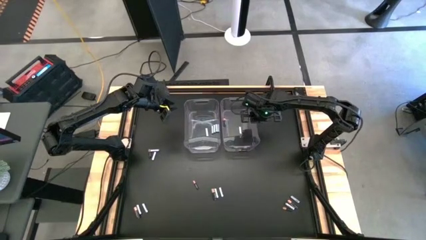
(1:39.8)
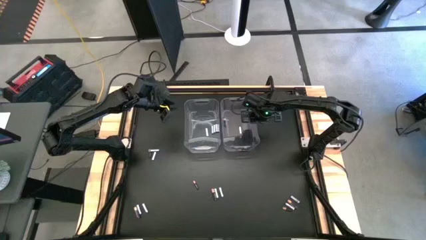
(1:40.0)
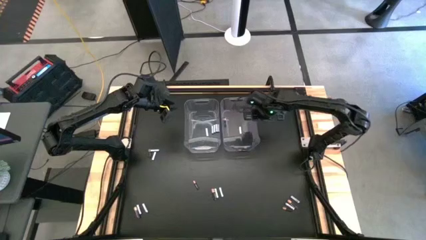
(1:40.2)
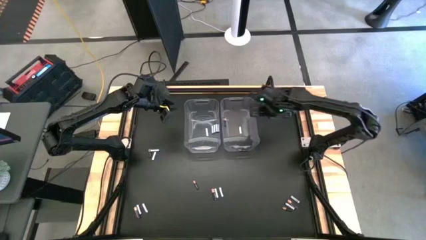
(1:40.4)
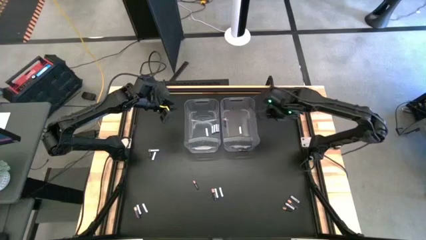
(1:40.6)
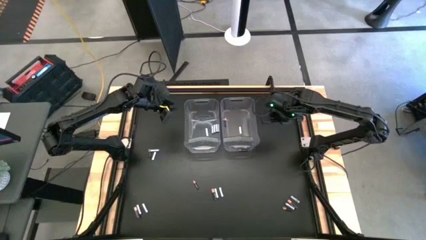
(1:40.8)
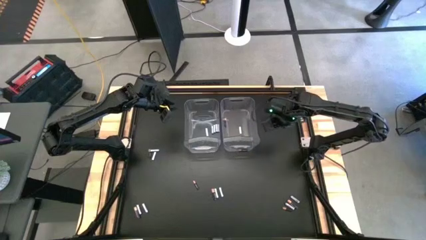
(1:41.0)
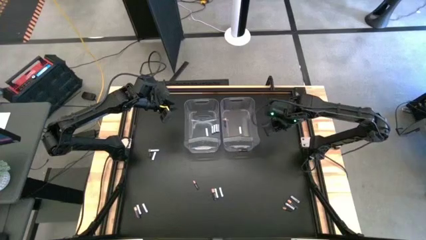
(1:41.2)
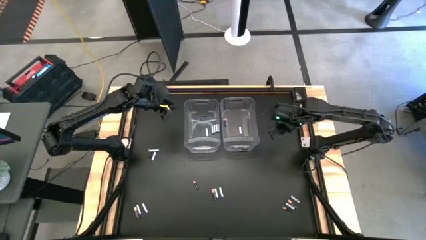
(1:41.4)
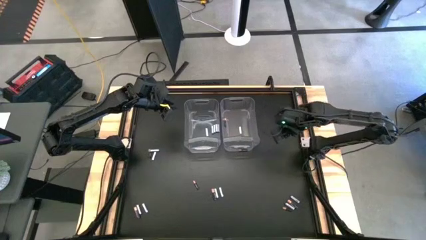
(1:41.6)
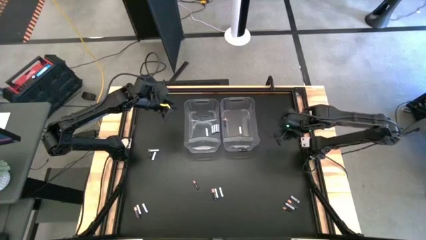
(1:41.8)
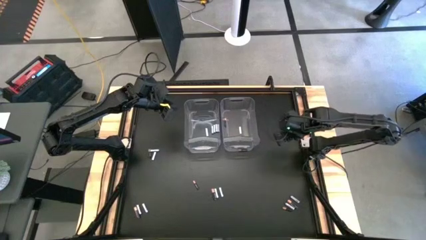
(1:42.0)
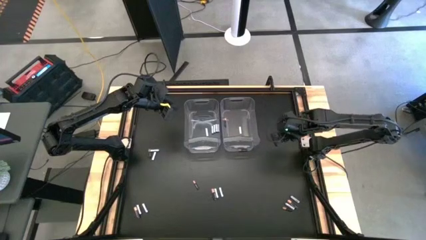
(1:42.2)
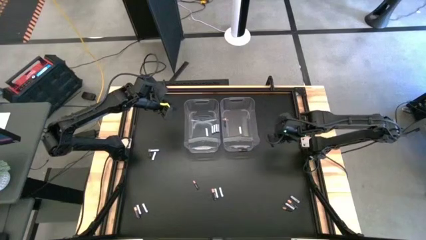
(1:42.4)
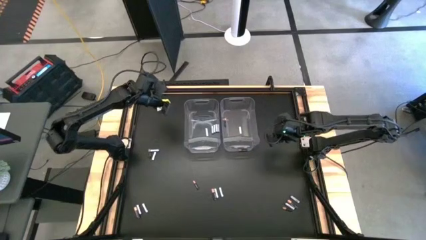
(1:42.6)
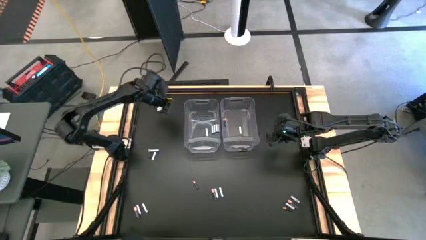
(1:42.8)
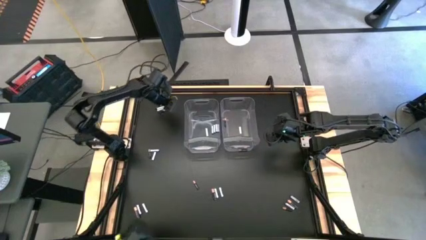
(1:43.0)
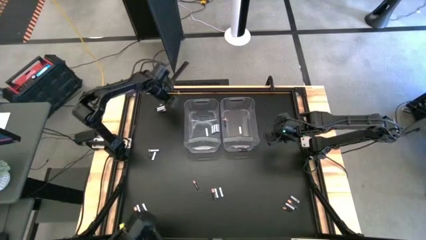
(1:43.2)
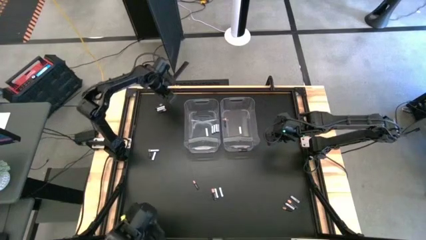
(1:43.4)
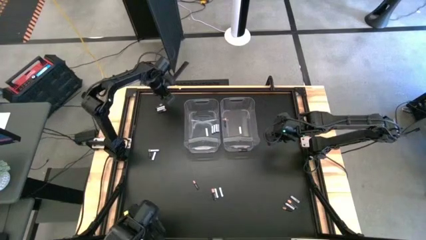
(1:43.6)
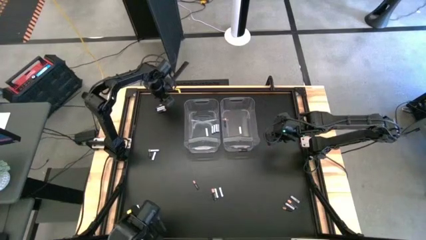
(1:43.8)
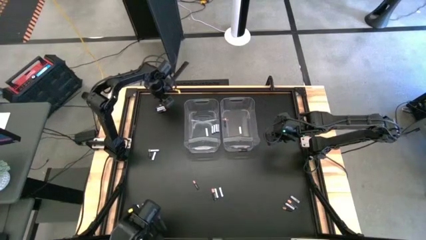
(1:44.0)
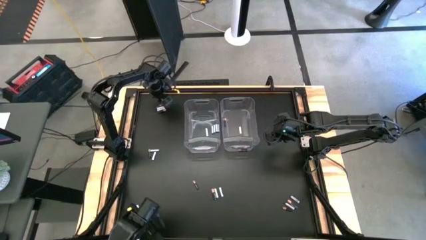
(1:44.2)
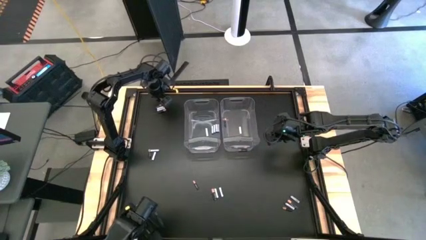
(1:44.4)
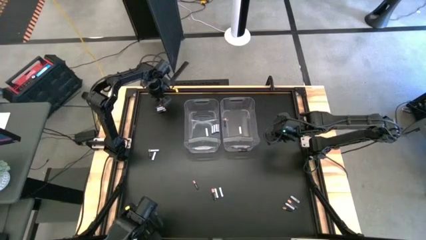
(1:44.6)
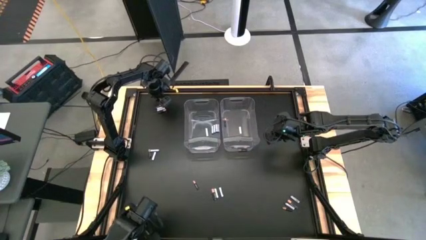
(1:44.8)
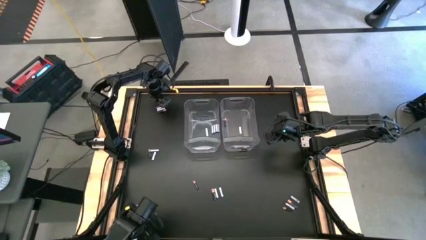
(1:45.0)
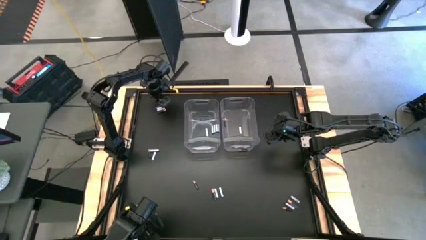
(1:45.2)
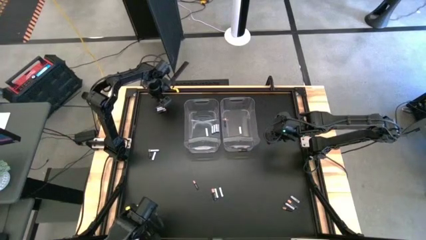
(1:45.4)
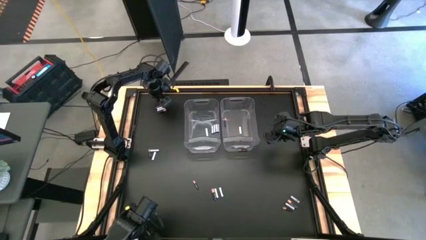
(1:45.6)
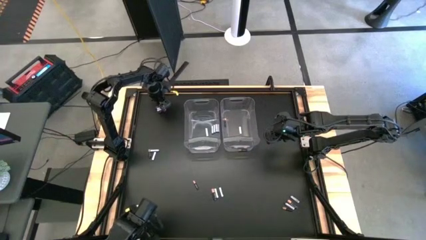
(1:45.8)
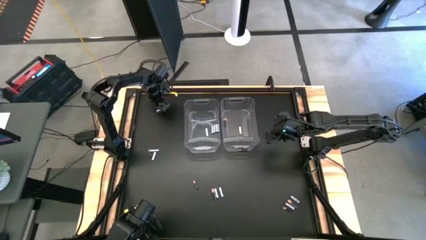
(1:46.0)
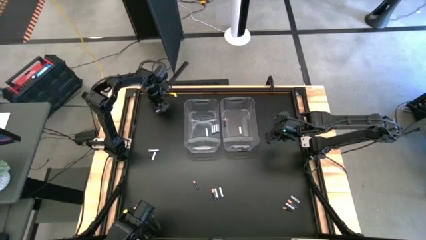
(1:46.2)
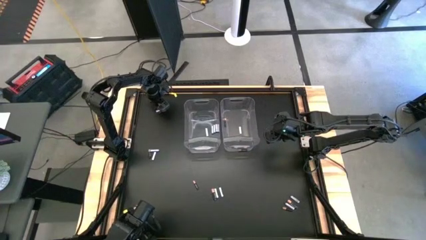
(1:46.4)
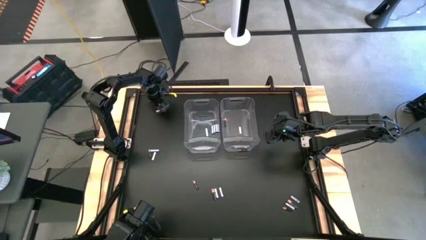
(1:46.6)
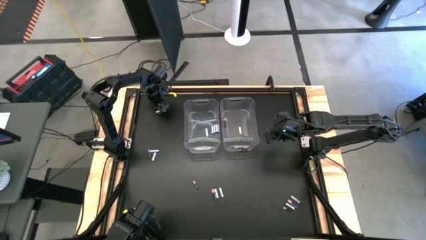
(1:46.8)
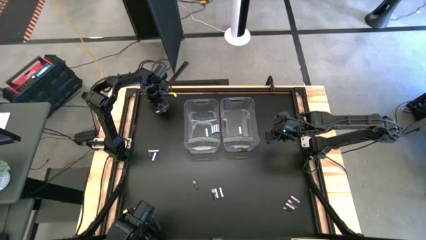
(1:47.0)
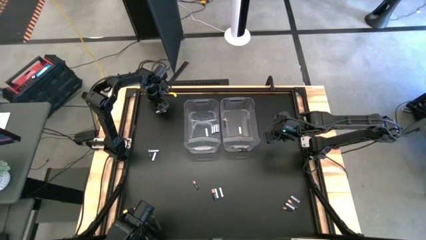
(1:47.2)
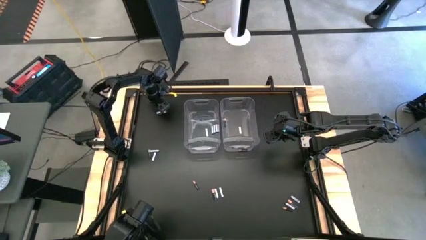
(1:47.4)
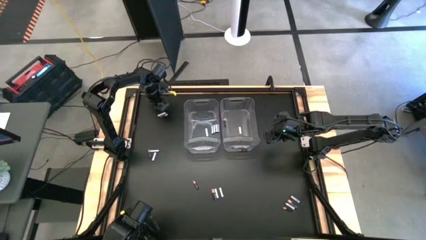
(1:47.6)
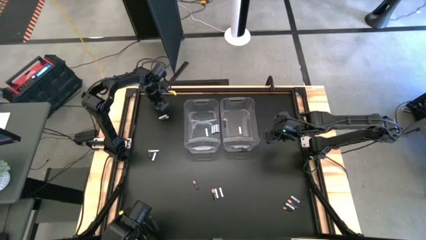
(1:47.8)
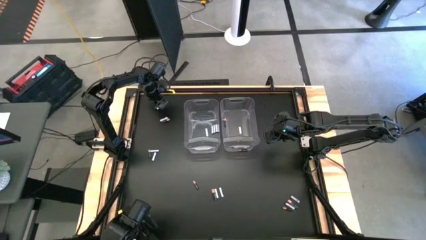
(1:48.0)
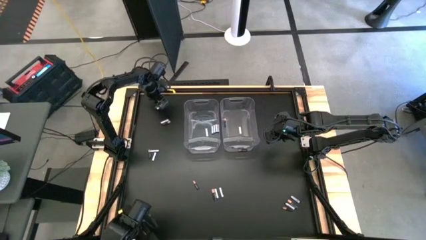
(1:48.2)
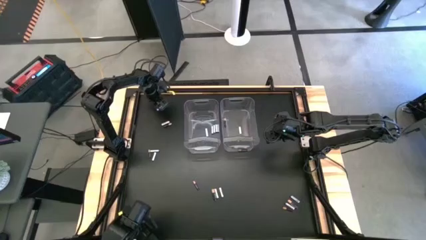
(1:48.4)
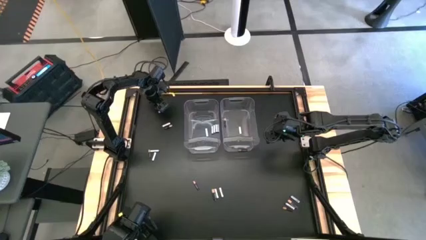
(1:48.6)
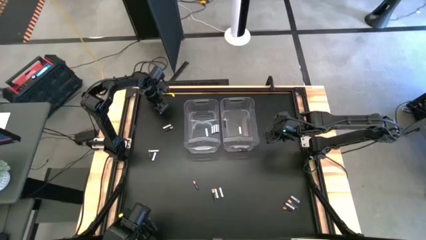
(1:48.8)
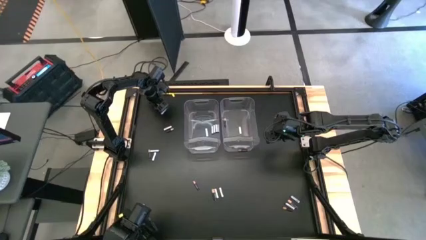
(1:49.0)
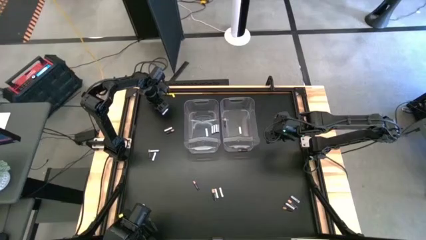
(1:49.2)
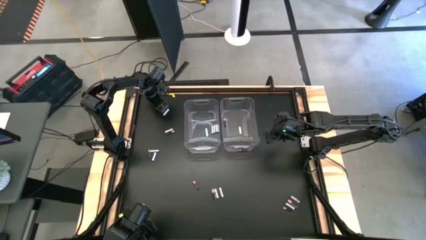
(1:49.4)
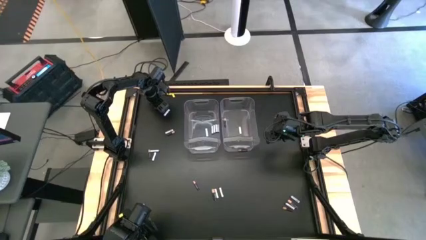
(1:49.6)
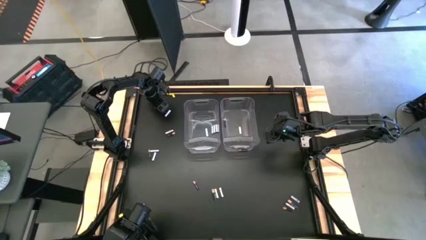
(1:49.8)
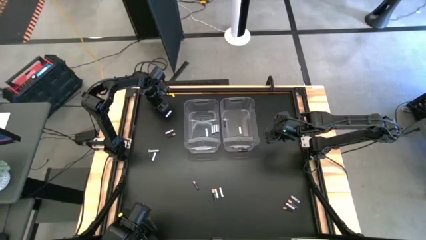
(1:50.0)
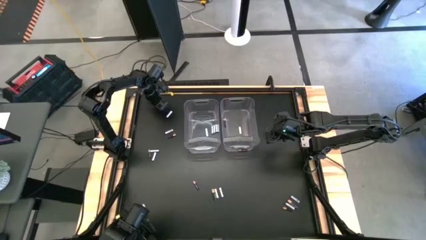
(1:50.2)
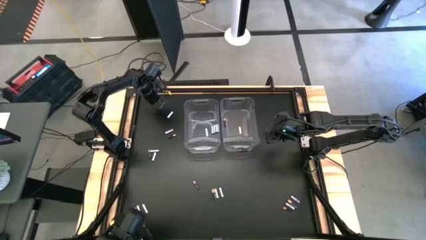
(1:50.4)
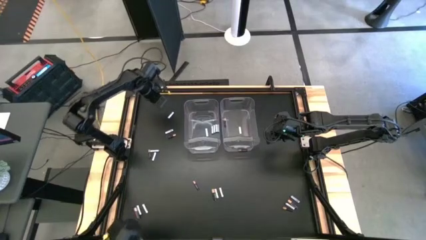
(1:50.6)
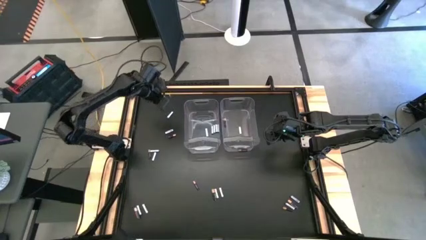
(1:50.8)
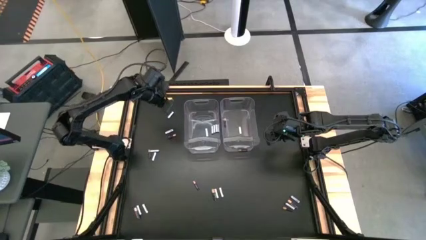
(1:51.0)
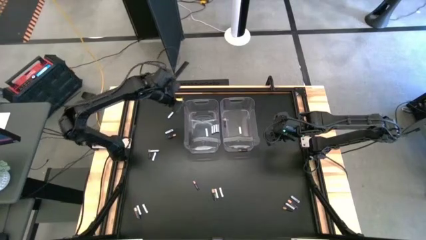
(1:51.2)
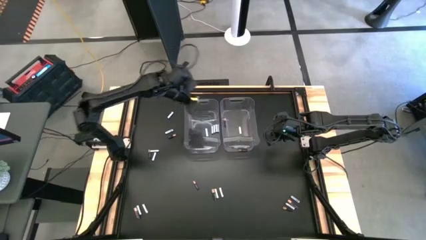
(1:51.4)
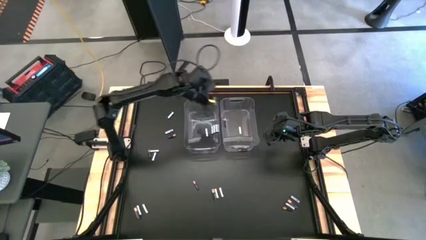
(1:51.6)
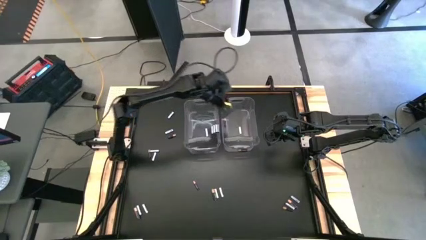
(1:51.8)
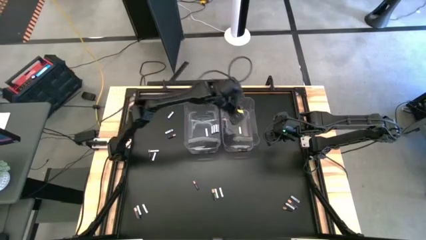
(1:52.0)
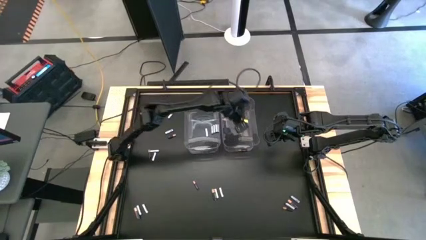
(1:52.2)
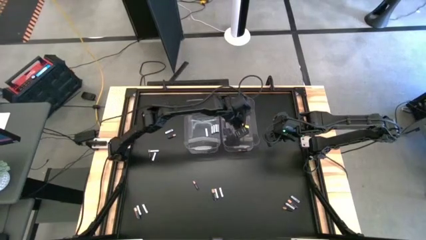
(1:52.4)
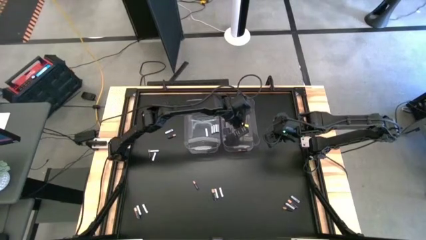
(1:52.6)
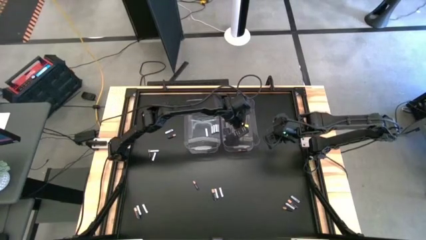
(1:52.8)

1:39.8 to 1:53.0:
Task: Sort batteries
Put the black battery into the right transparent bin

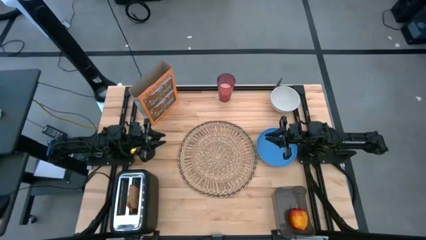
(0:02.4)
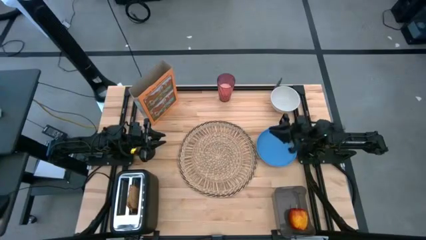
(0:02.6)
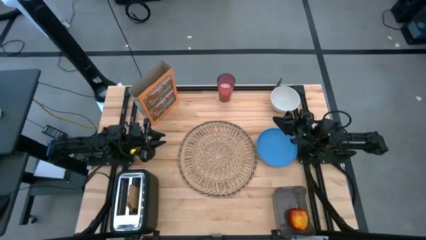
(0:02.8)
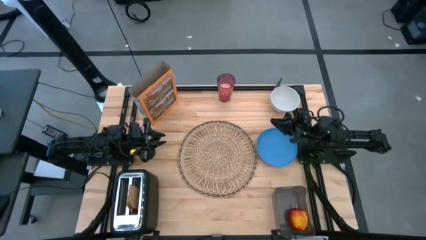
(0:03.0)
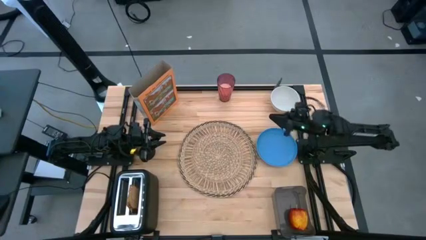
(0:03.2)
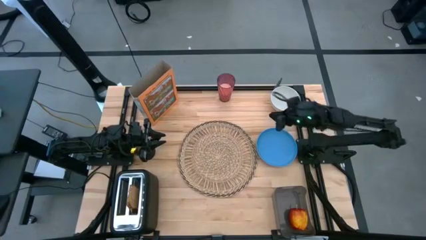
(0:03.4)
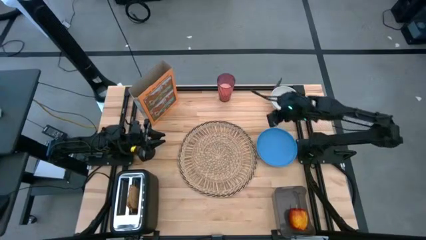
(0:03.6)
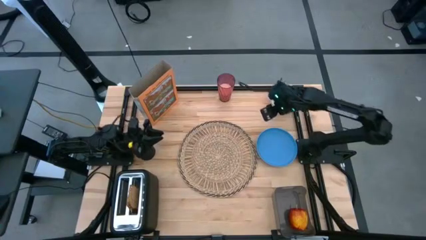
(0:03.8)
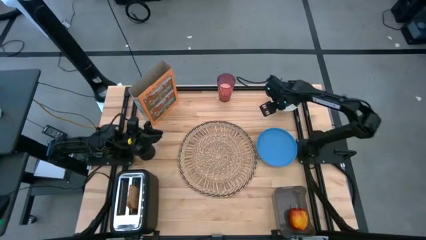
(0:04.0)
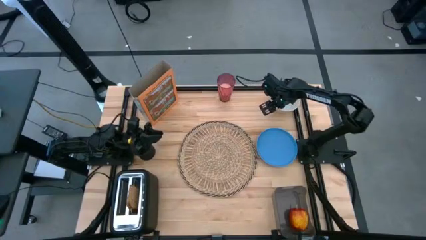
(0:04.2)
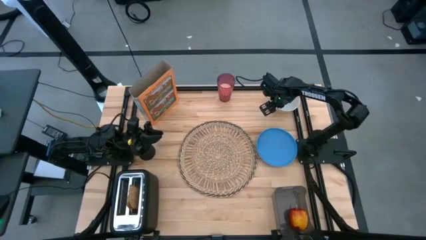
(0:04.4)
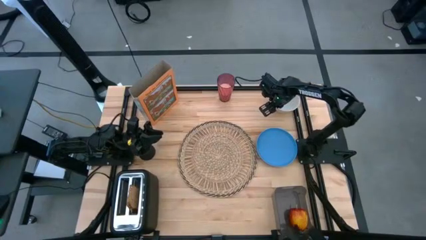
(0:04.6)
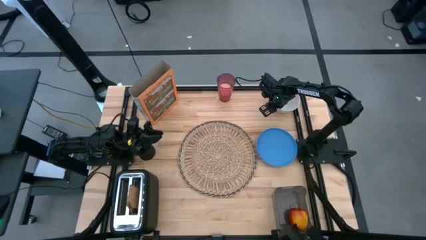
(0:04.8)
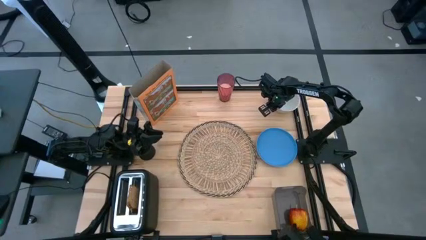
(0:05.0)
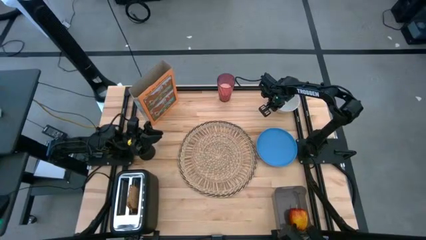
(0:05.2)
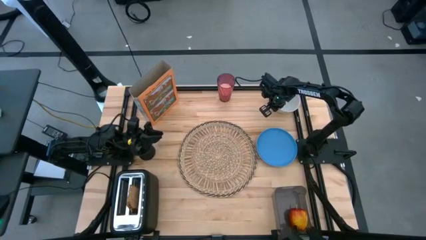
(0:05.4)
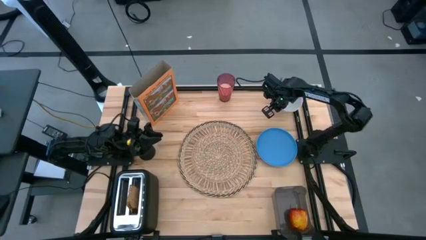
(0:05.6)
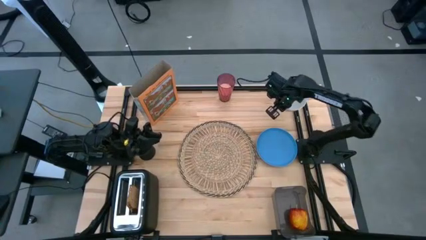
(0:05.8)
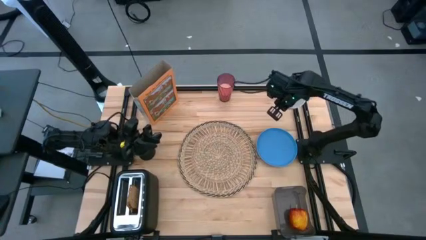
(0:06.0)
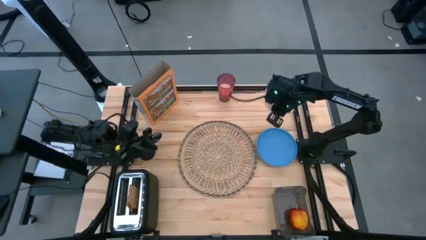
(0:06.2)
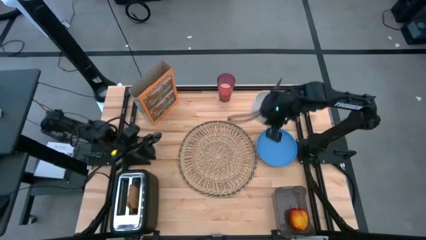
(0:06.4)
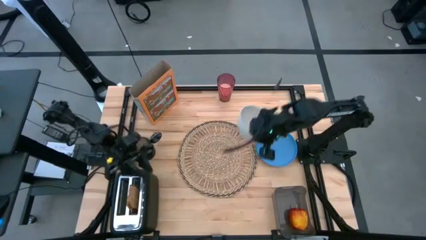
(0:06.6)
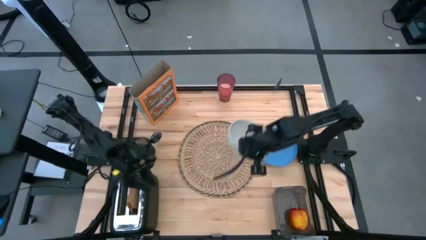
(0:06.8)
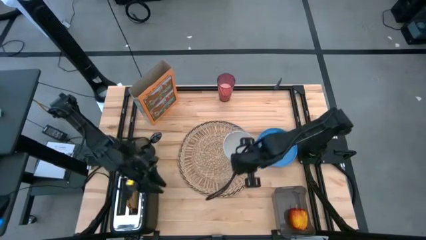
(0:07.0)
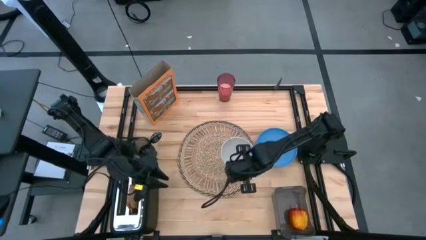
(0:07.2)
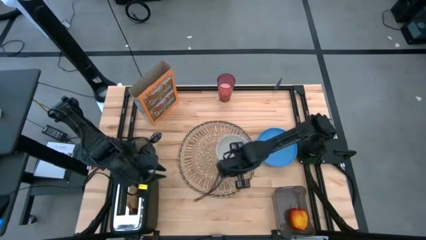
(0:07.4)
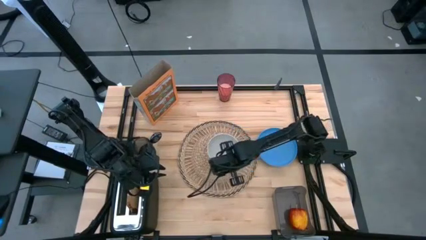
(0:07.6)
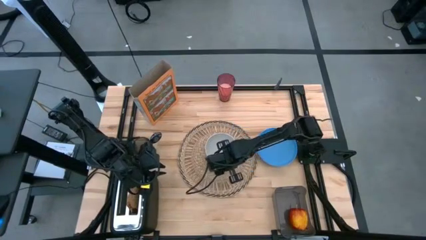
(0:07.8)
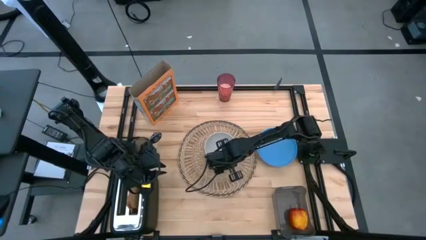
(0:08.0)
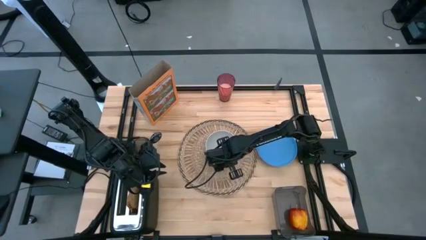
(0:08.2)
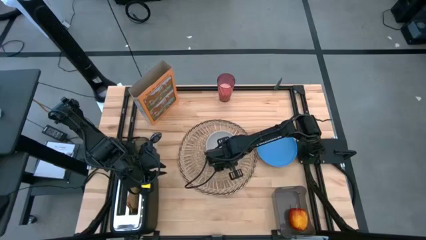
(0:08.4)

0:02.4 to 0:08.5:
Task: Arrange a breakfast setting
Put the white bowl on the table mat
